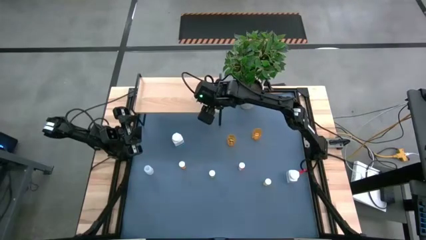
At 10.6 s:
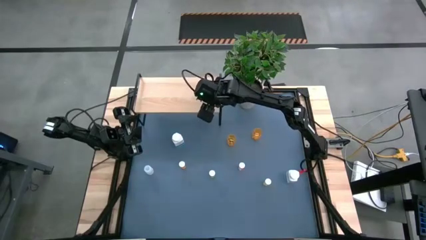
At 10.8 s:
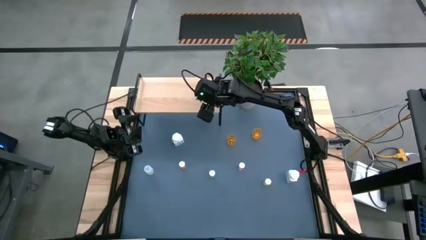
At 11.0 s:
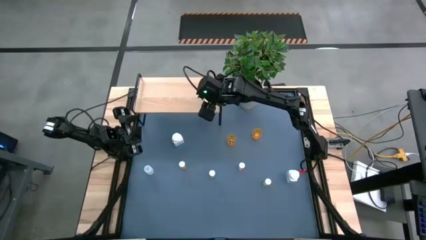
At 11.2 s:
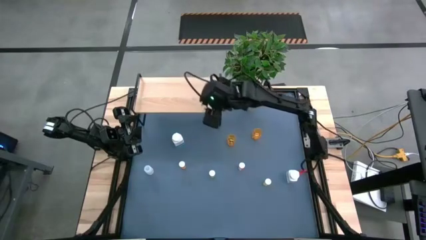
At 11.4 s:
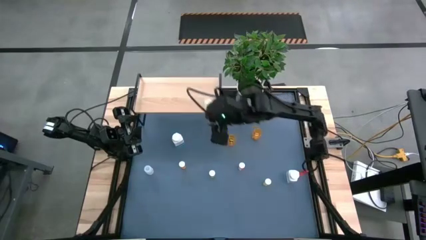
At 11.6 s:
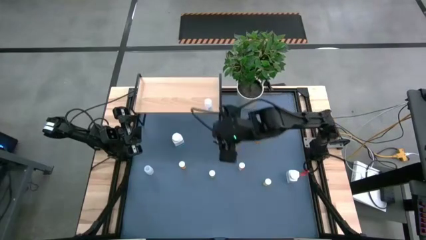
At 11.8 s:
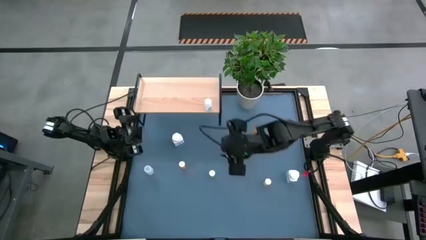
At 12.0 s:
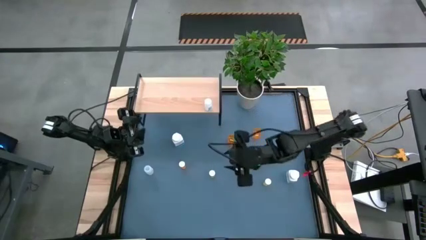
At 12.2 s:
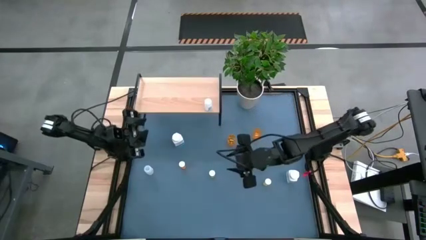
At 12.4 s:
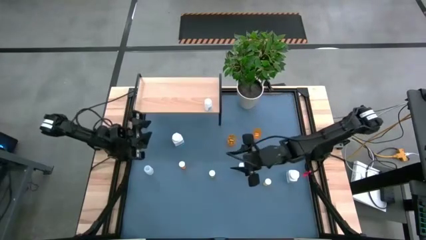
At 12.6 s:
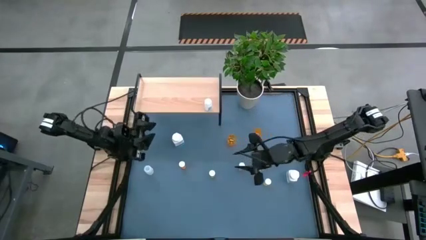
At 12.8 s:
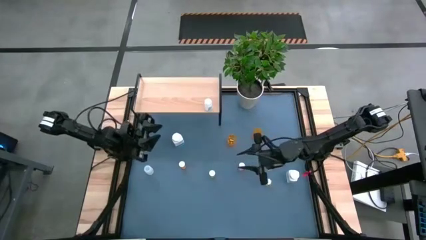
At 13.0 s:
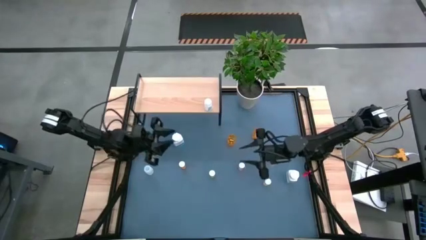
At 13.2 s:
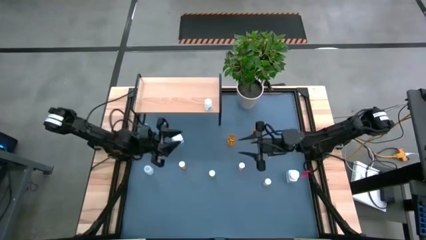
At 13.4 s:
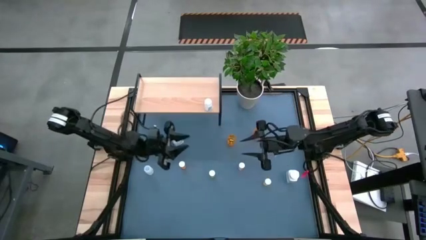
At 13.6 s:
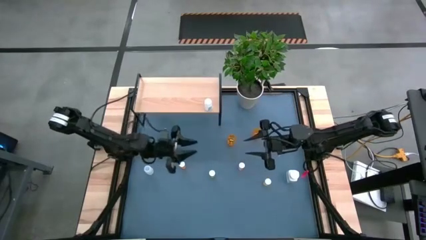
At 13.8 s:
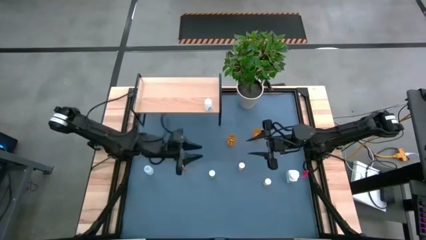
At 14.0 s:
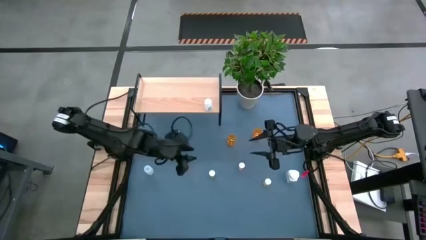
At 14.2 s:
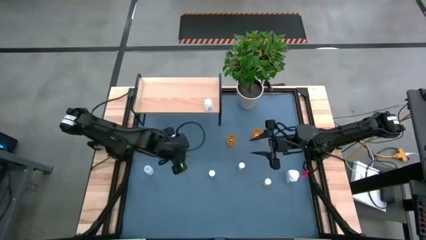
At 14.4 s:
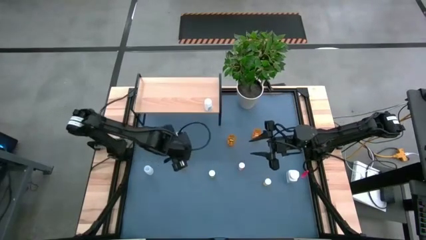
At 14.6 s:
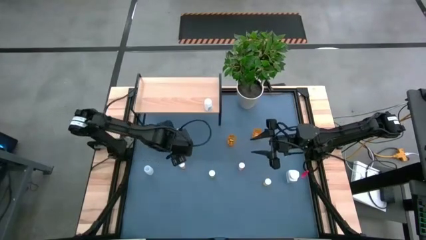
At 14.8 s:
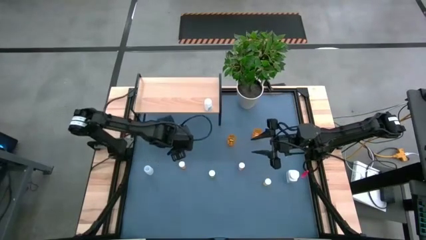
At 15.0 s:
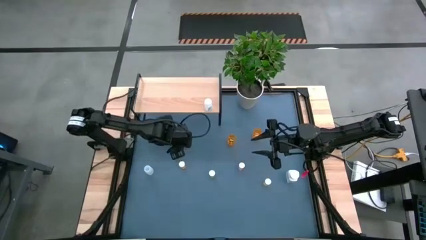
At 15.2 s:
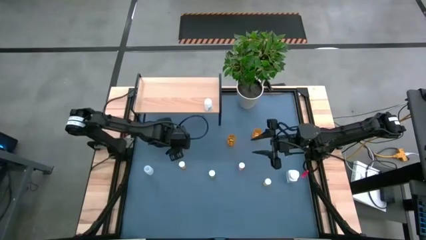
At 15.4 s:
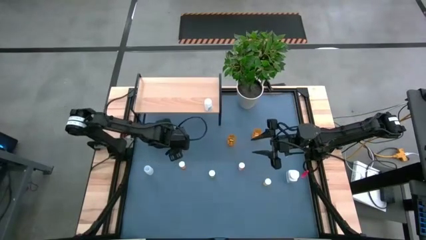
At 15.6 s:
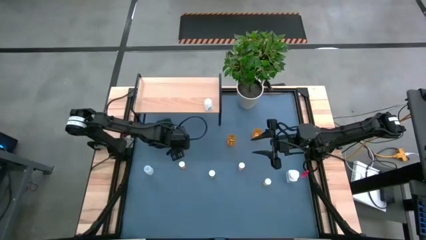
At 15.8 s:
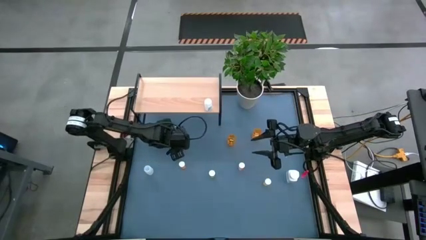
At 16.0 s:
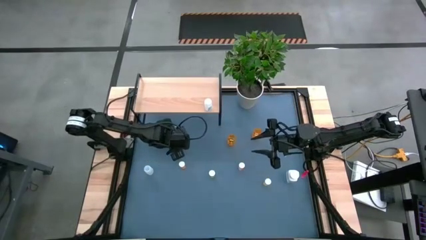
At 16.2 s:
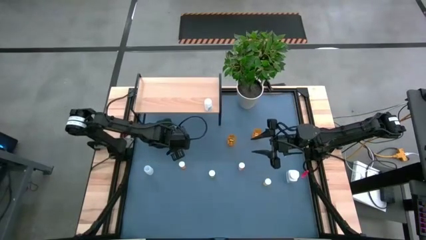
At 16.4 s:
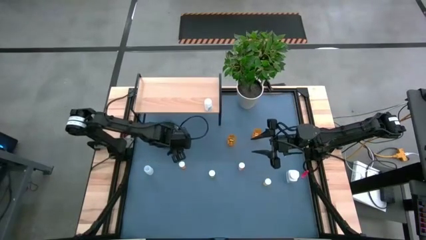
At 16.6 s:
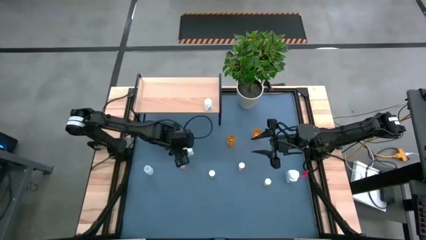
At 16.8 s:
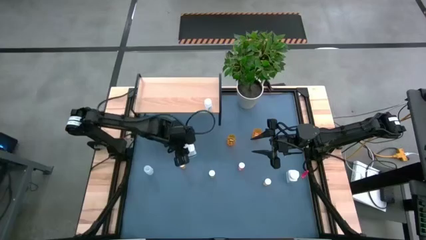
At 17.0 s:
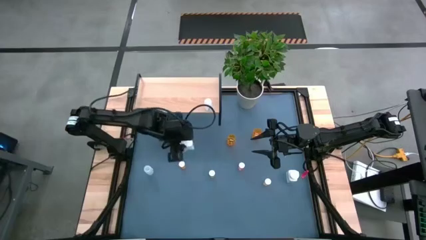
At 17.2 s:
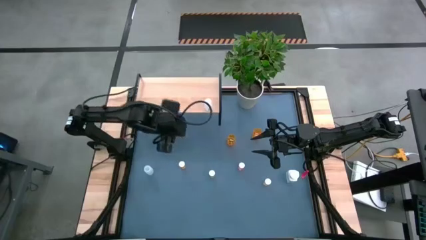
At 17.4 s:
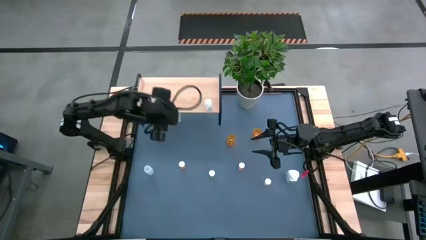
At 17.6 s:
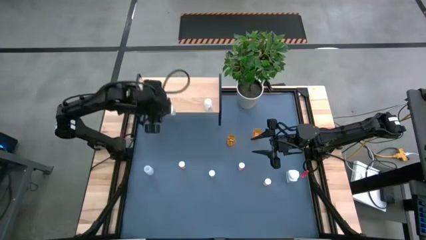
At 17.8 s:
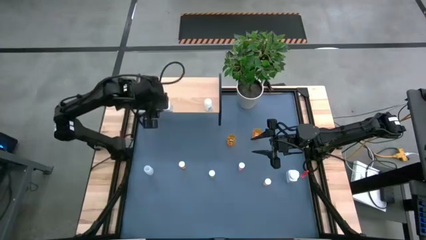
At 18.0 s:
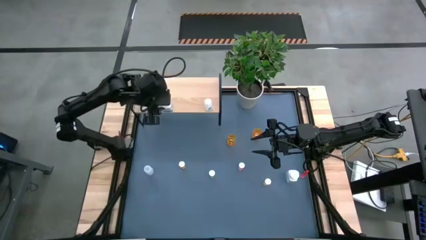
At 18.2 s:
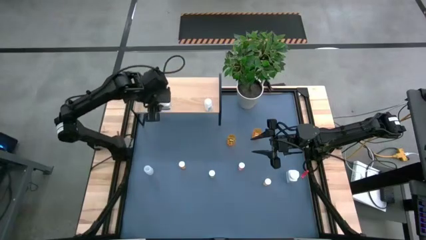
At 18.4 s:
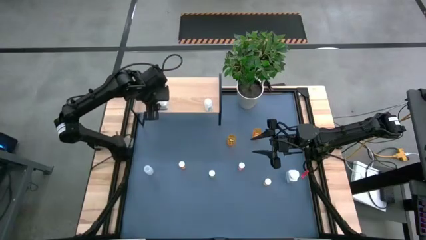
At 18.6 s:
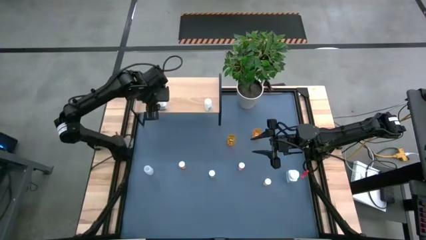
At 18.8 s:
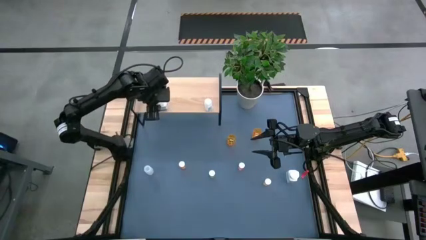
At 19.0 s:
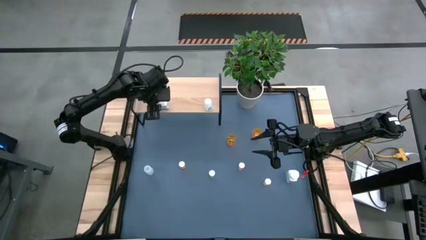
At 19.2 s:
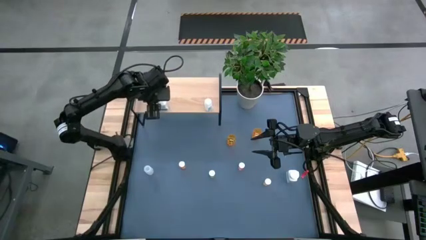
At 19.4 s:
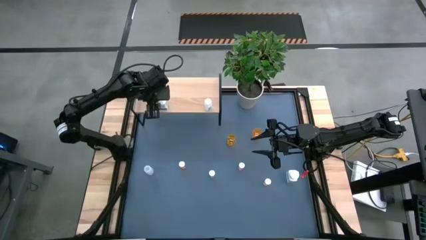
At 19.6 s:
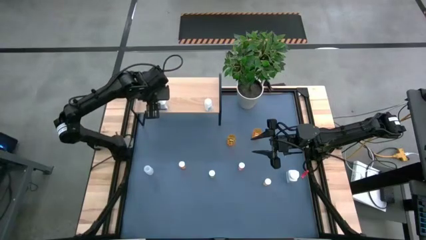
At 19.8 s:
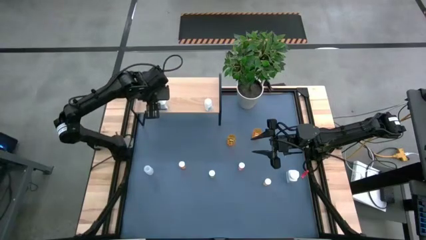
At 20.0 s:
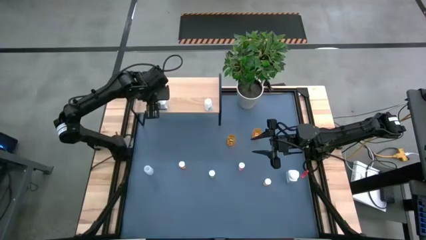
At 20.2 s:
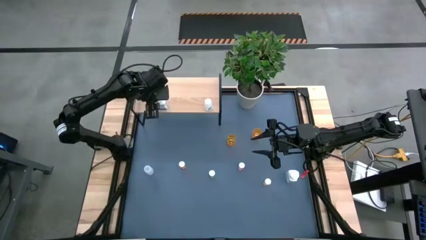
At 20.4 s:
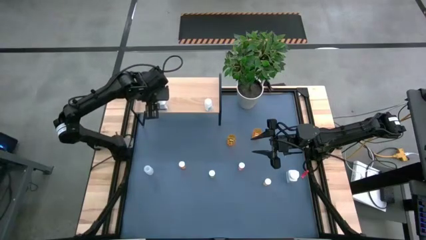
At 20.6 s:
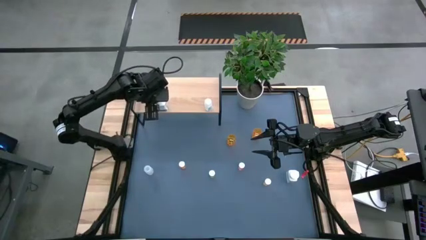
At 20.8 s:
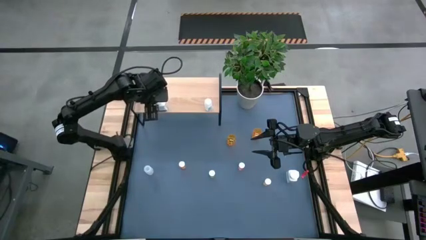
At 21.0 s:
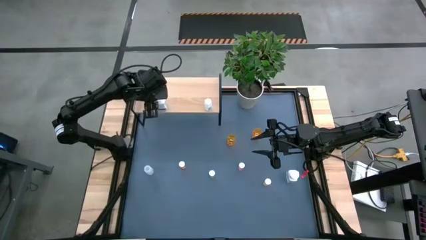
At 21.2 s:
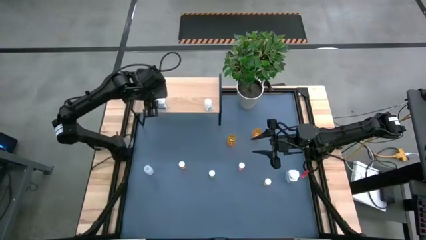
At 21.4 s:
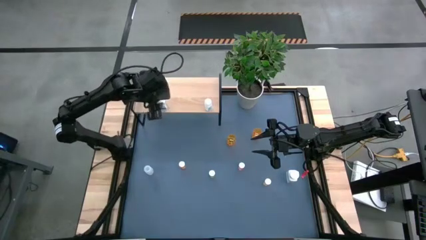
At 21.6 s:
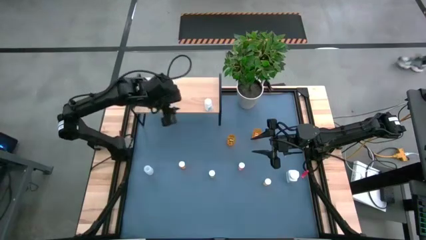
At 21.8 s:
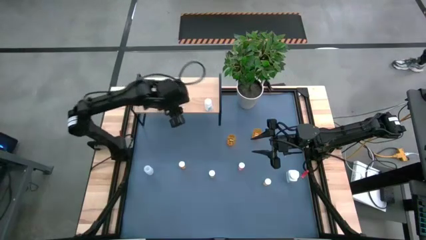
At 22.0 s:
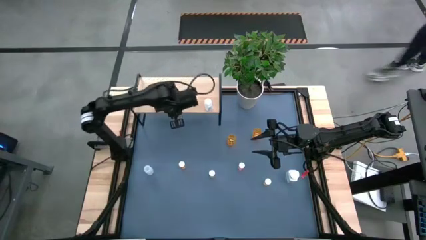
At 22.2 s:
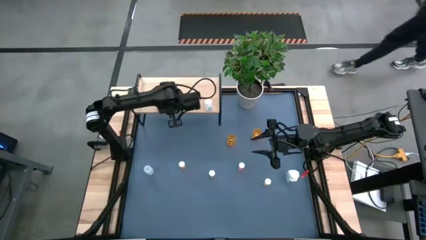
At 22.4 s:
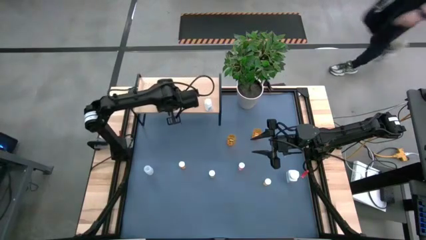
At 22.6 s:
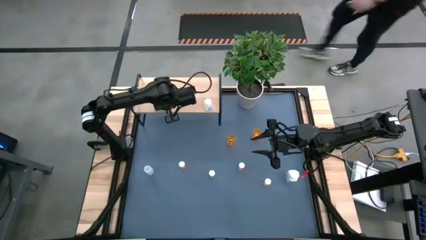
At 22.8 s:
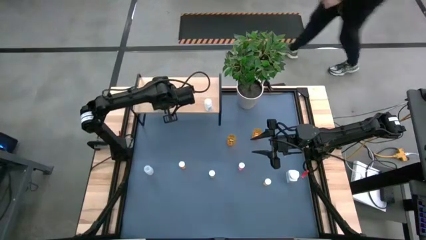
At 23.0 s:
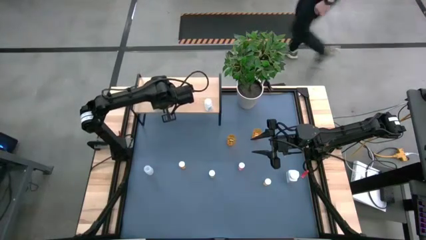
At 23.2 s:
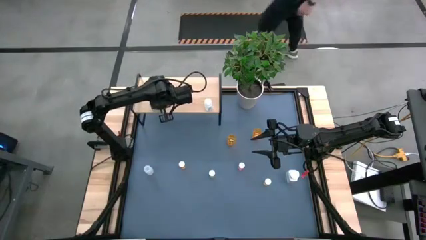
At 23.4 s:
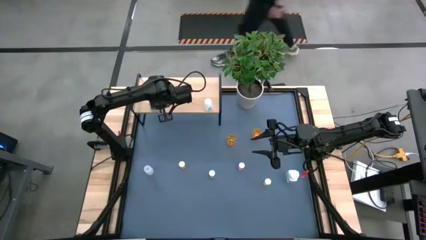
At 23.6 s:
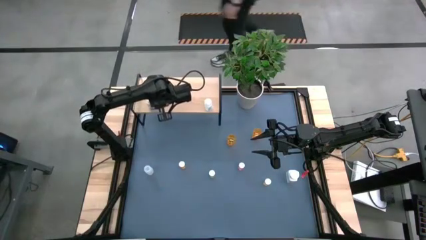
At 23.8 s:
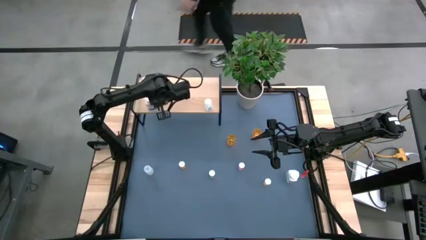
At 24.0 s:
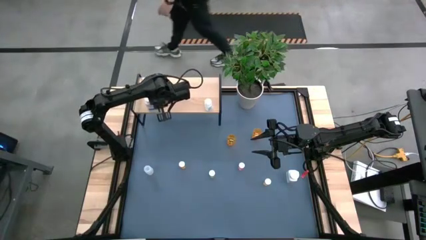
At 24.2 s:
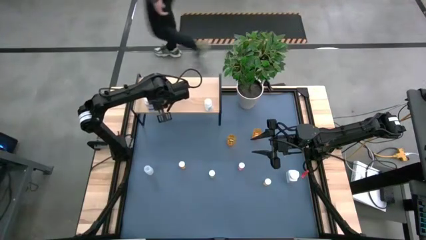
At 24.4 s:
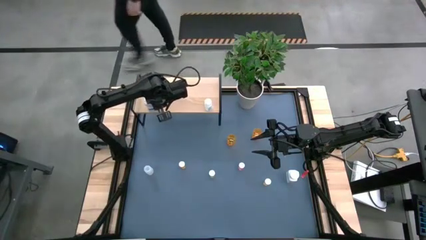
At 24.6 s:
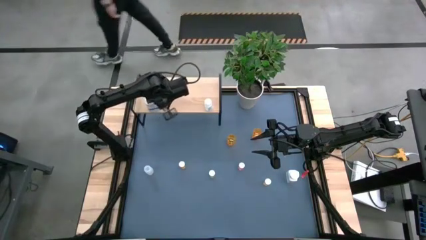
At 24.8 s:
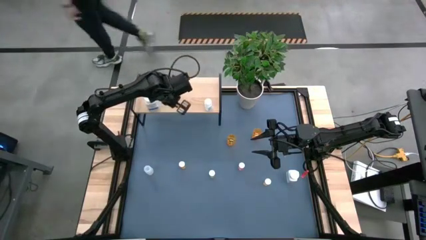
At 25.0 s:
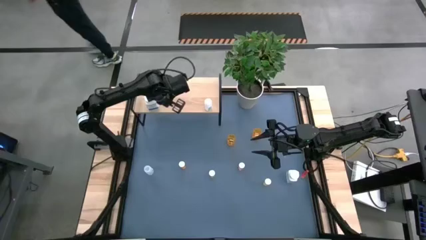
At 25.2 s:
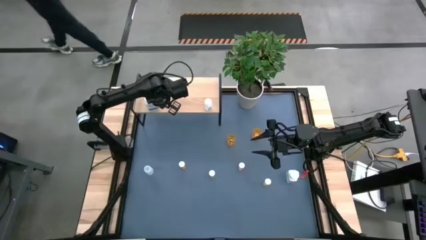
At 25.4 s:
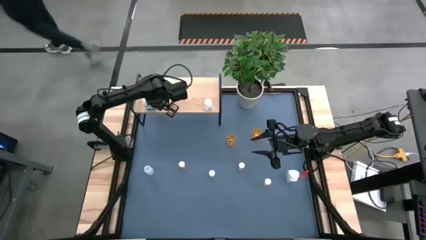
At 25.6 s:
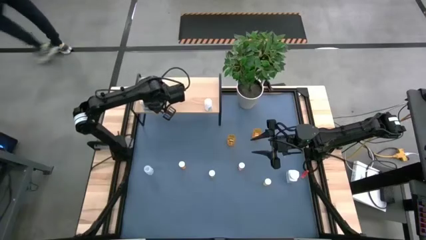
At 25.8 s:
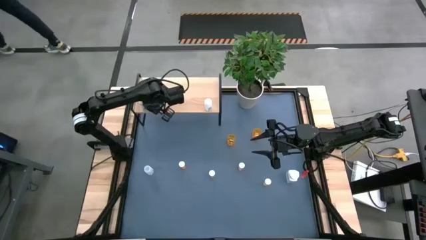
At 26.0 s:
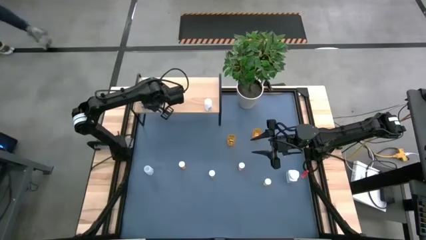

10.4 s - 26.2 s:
Task: Pick and place medicine bottles onto shelf by color
Put the left white pill bottle on the shelf
